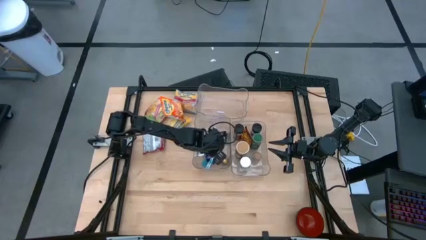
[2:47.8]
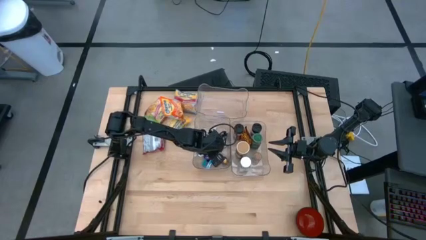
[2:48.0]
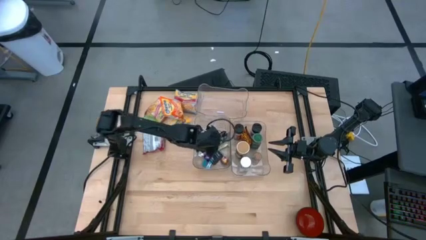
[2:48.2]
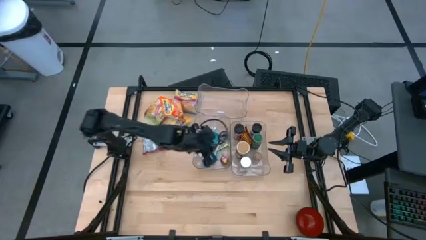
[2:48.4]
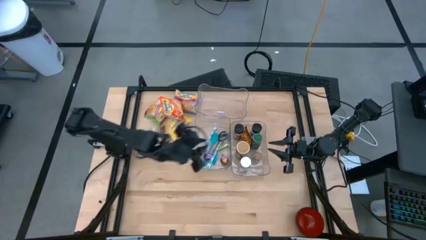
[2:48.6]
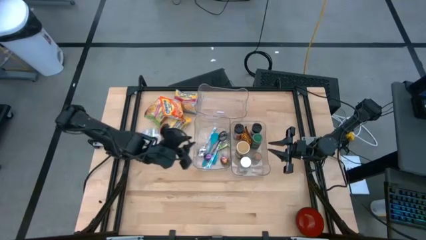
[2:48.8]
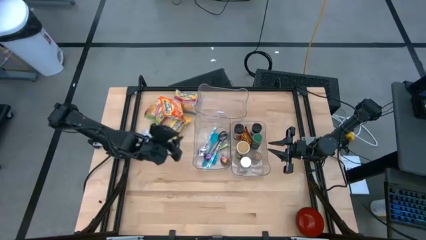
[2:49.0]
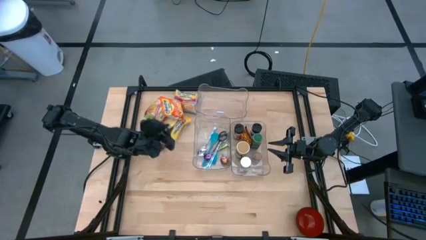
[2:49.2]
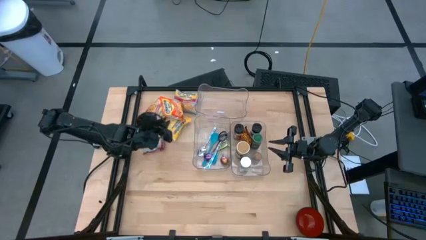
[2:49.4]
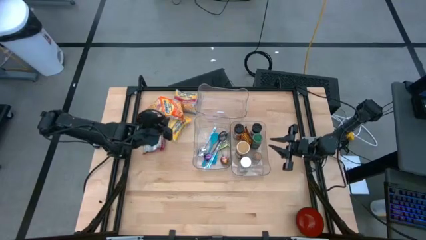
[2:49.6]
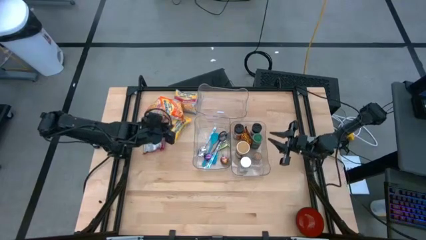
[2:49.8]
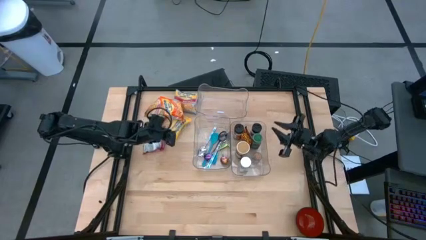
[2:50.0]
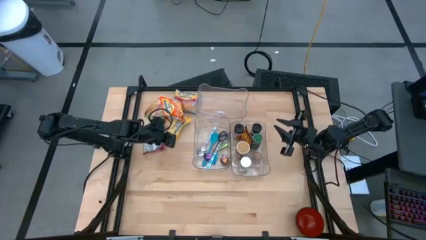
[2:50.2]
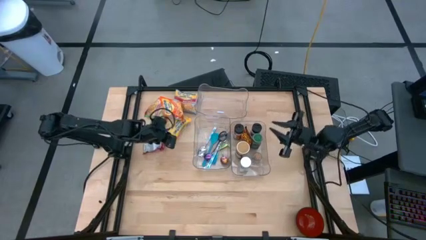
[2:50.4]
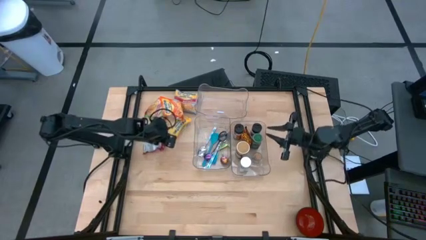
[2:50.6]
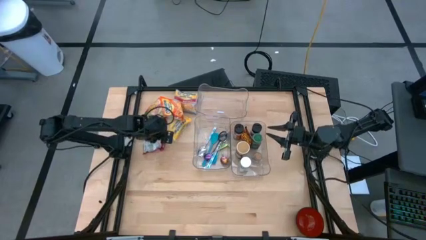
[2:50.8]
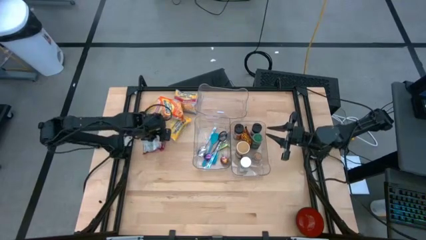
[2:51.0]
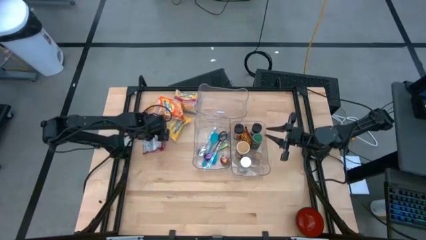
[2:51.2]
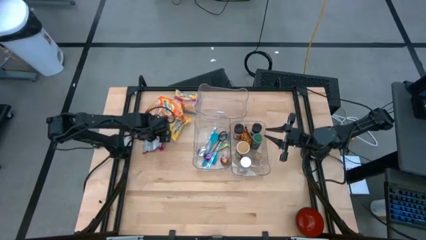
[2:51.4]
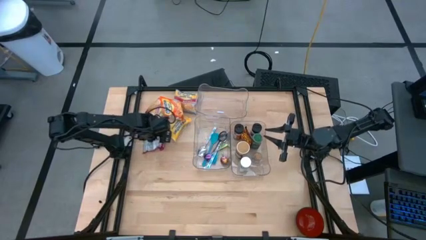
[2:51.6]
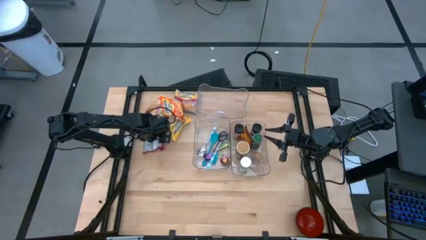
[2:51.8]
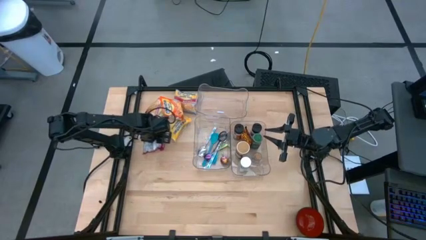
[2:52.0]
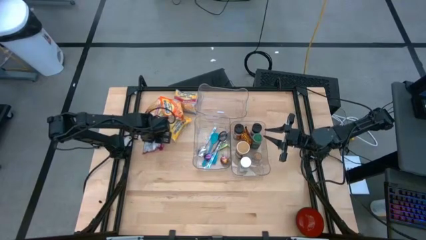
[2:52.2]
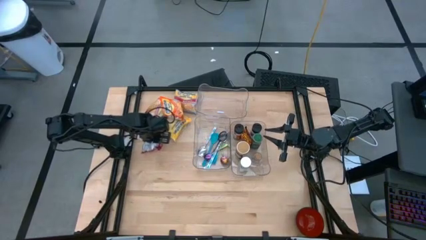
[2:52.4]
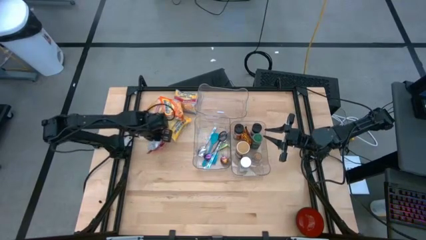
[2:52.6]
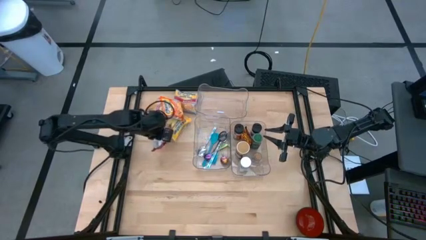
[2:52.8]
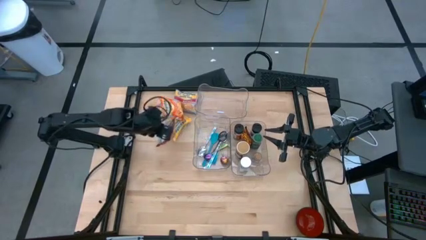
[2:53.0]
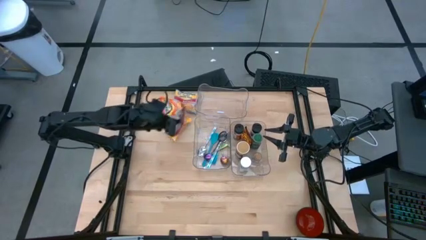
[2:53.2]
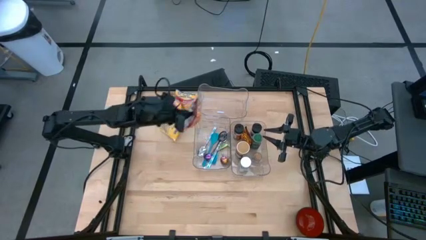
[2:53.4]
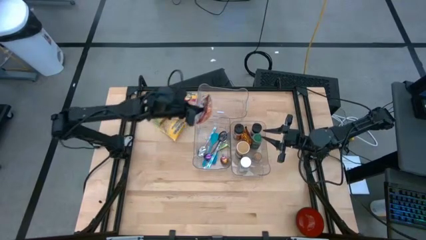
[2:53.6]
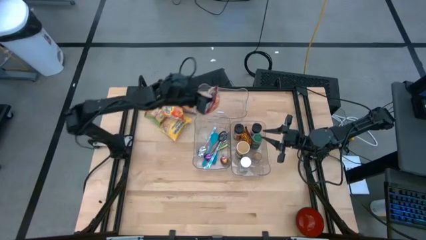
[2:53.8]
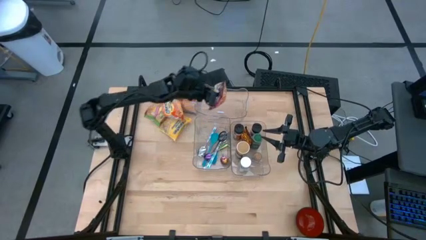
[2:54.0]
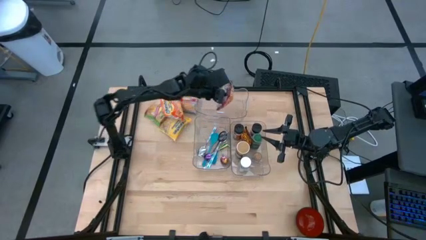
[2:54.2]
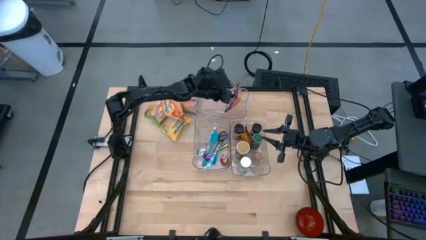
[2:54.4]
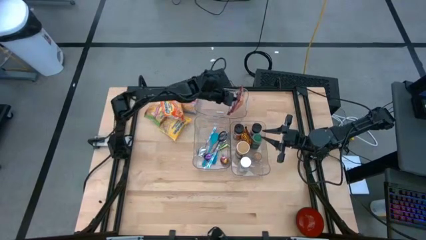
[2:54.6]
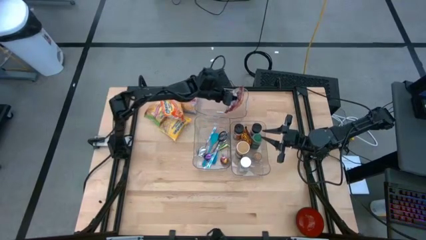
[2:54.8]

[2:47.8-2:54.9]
Task: Pick & Place Food Item
Put the red noodle pack into the top transparent bin

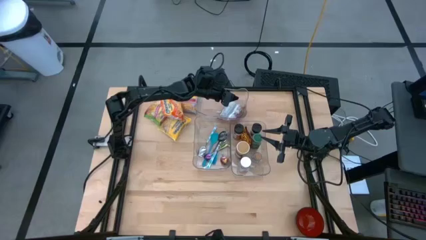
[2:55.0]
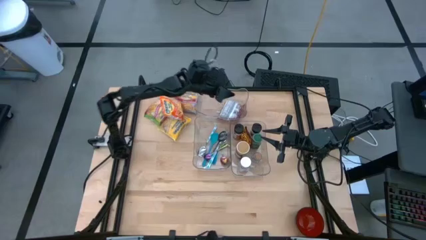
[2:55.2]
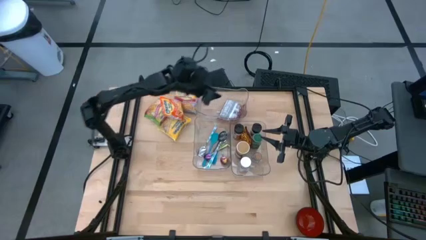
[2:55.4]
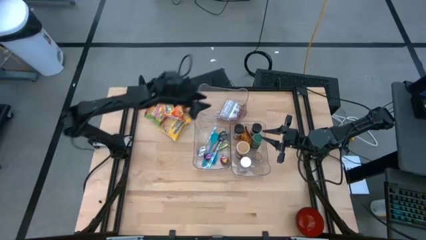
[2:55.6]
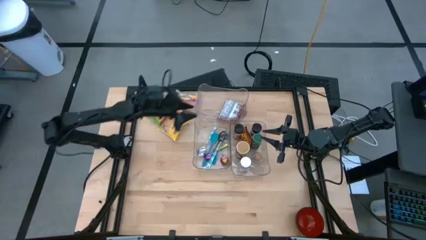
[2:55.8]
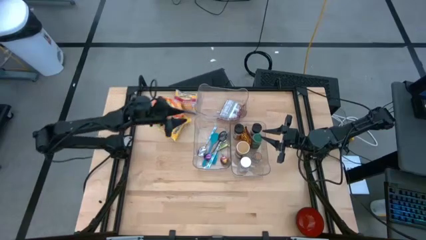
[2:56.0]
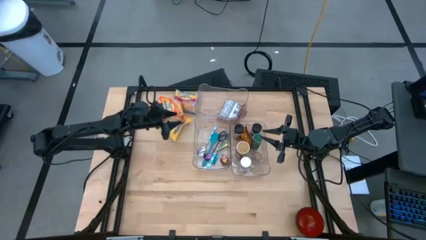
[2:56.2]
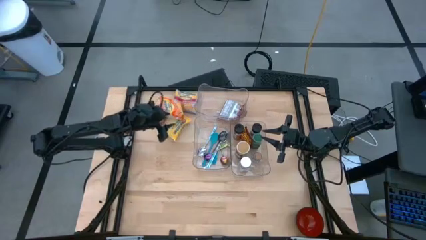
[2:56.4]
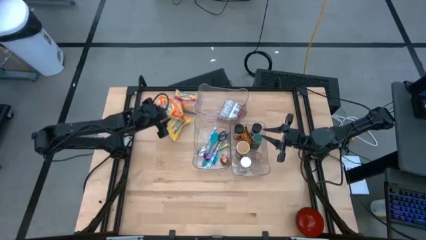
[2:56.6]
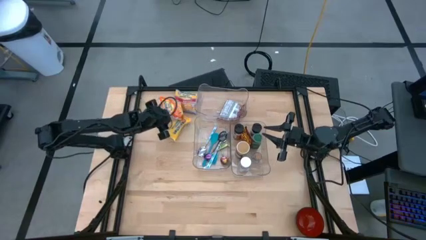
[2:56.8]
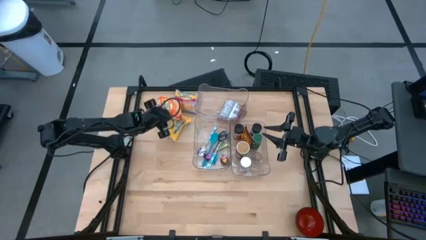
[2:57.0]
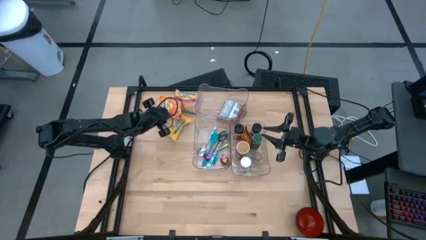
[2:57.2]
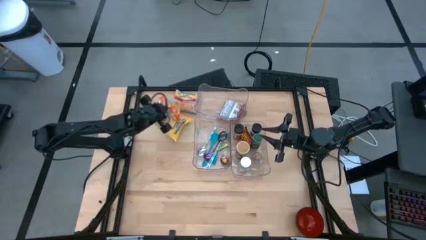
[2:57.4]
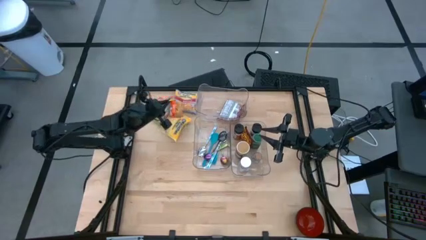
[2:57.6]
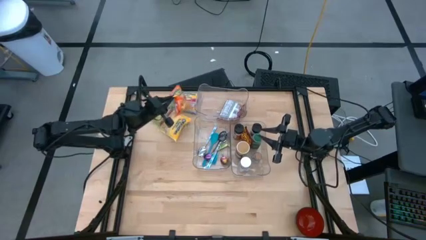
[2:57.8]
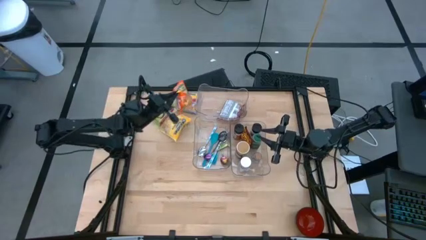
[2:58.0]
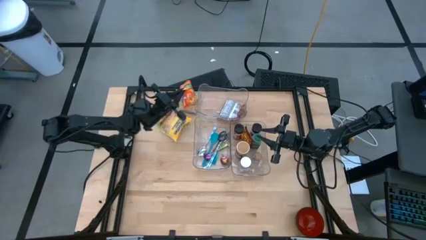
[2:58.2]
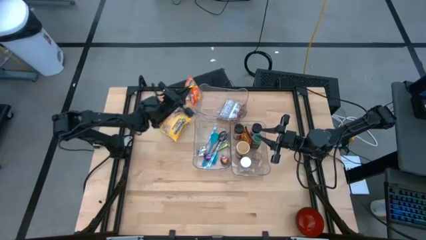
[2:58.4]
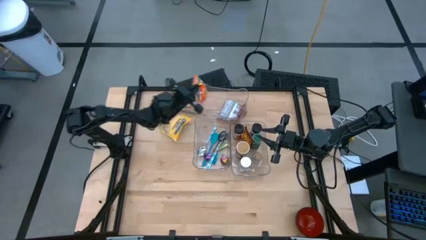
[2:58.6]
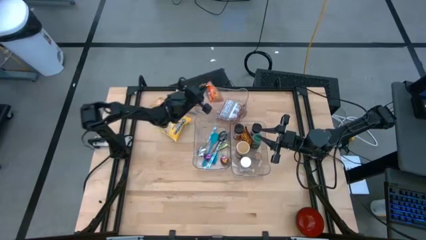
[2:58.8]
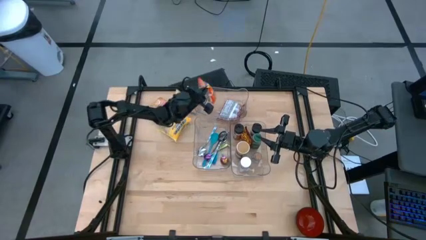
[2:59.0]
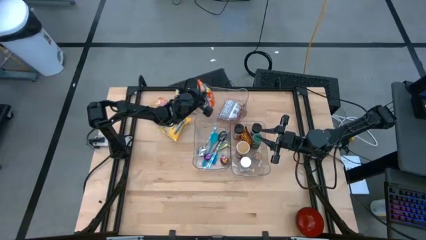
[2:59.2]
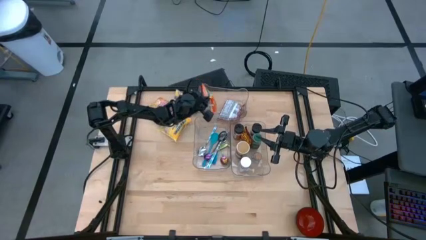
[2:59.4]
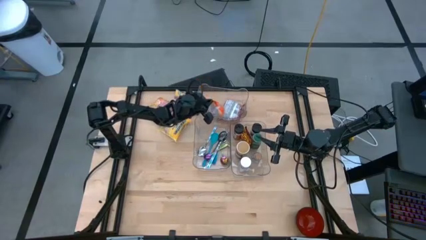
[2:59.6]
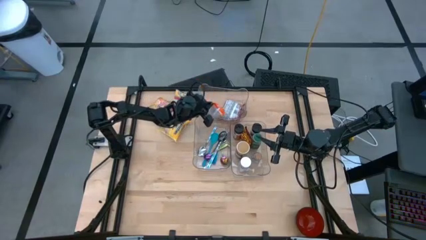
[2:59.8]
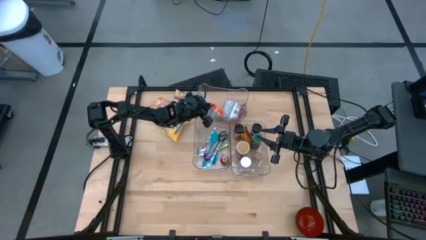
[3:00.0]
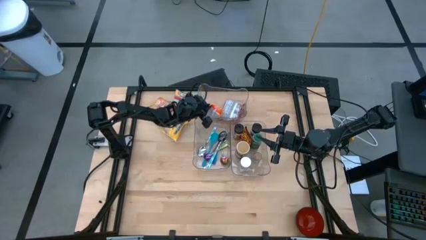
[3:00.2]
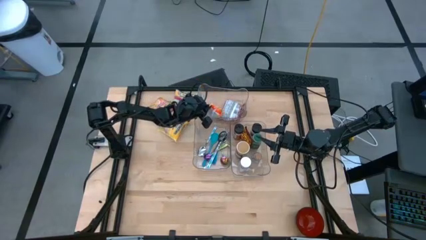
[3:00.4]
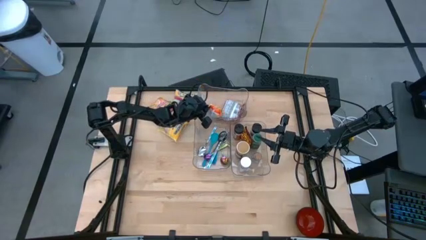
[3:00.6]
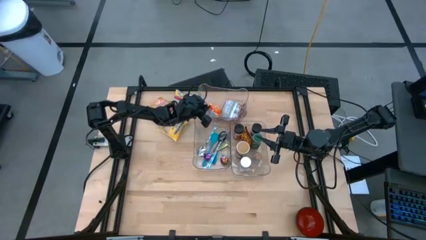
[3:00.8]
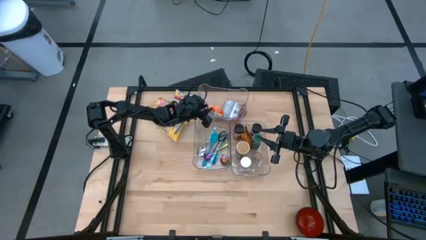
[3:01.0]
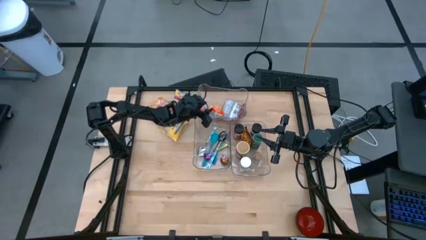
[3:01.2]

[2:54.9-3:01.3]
Put the orange noodle pack into the top transparent bin

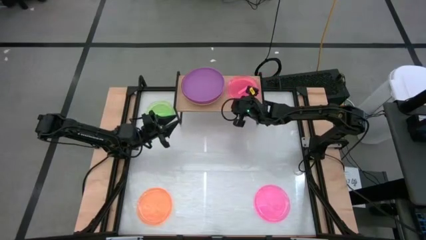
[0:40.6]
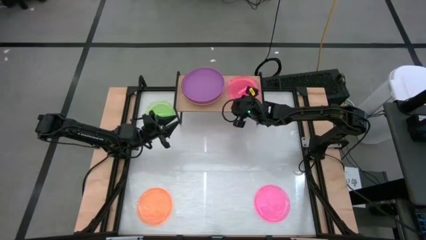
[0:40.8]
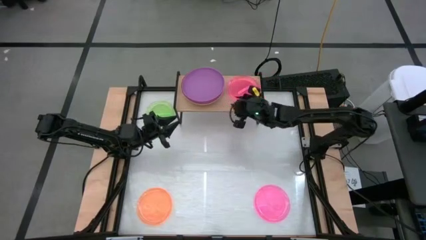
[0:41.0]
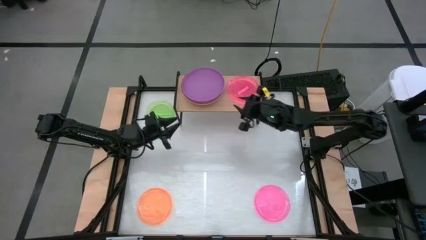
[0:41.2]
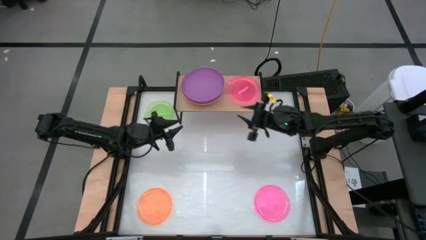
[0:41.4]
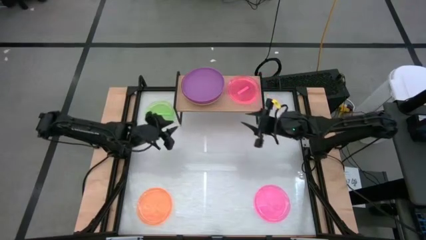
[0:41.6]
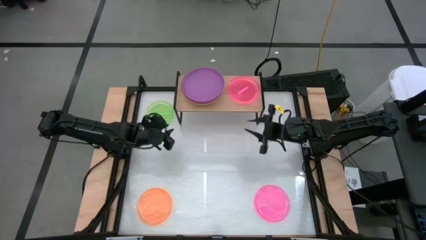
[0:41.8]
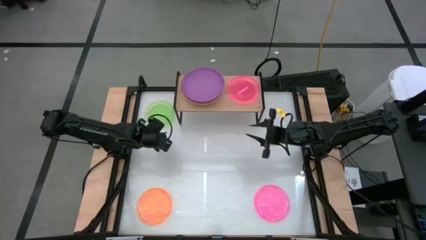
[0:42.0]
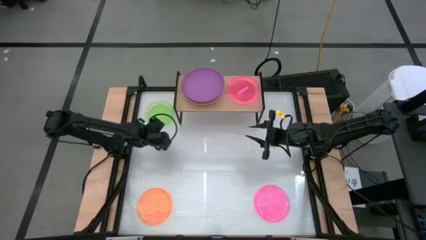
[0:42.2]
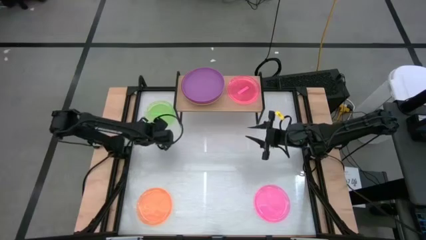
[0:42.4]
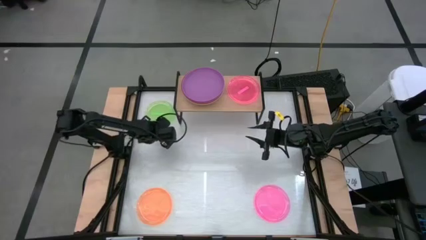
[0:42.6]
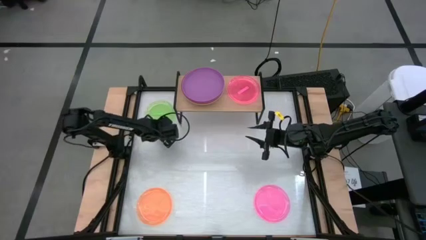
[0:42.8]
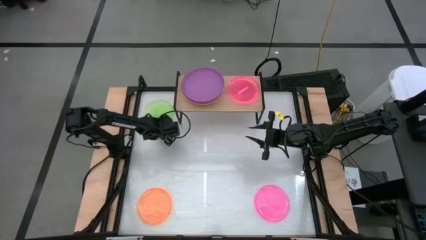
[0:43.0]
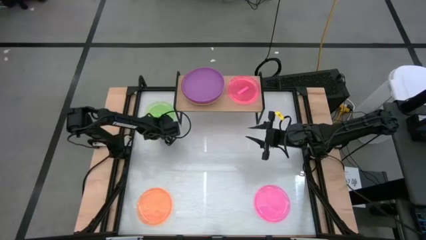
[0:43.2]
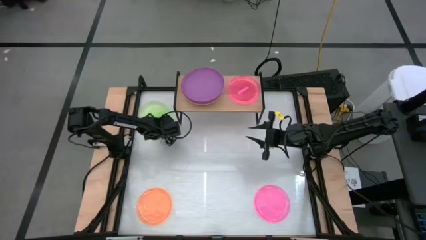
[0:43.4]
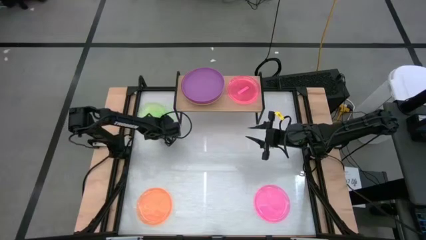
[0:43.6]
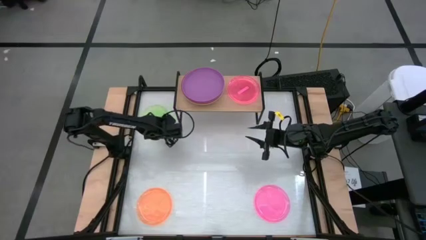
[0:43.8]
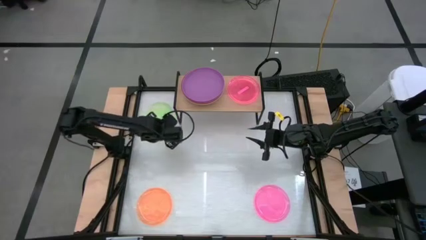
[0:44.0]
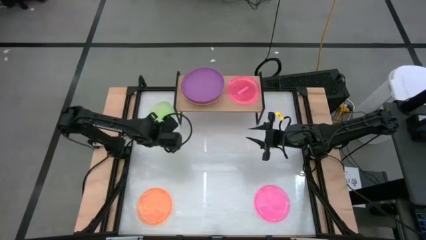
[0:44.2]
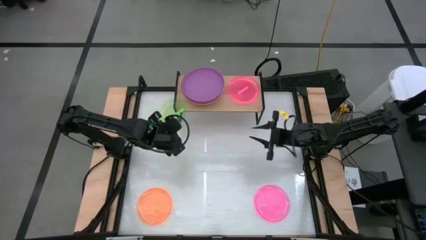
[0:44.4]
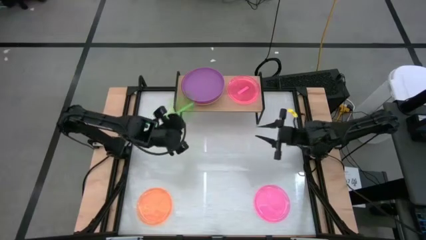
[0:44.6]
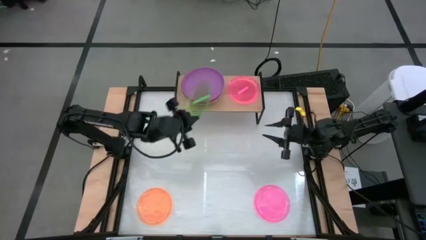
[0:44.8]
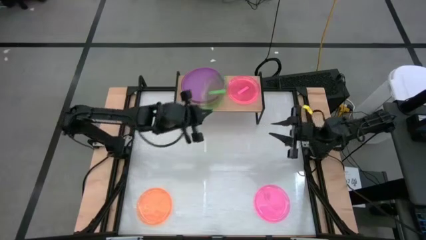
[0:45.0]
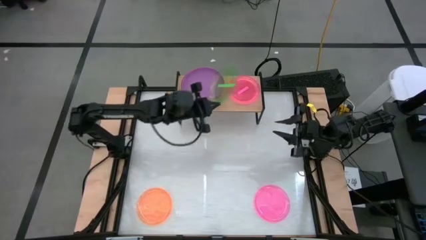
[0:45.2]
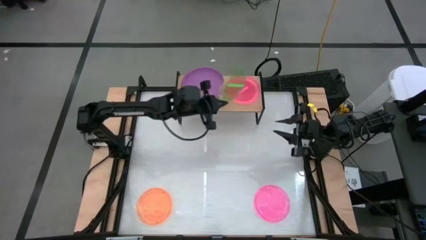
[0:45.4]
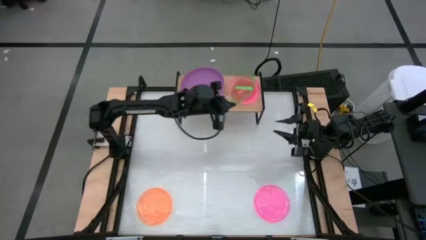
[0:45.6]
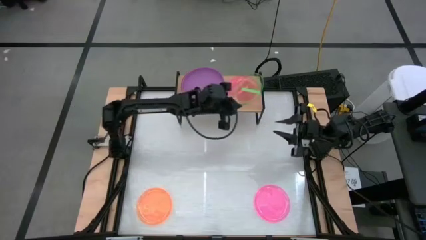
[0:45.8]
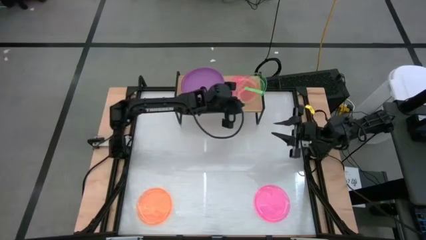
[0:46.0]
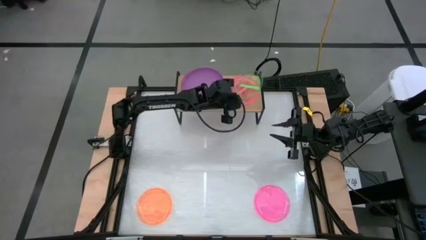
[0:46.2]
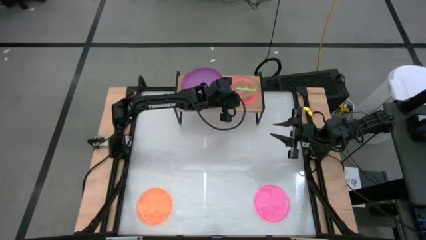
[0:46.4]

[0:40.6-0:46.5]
Task: Place and stack plates onto a shelf
Stack the light green plate on top of the light pink plate on the shelf
